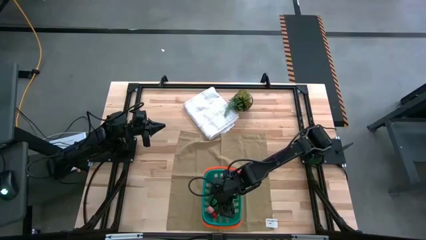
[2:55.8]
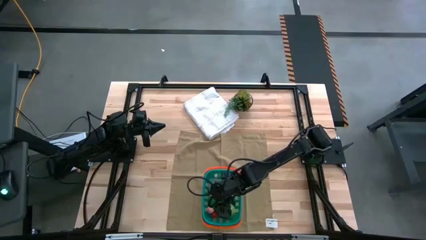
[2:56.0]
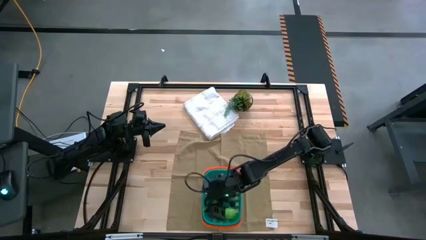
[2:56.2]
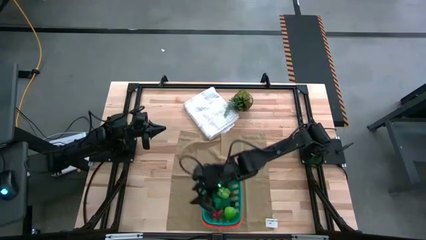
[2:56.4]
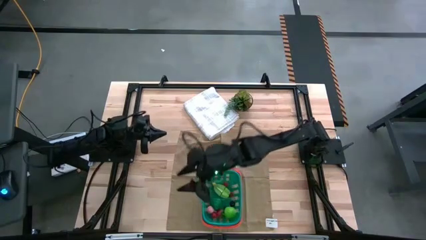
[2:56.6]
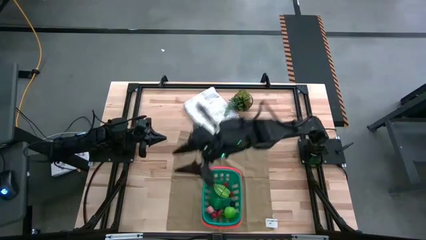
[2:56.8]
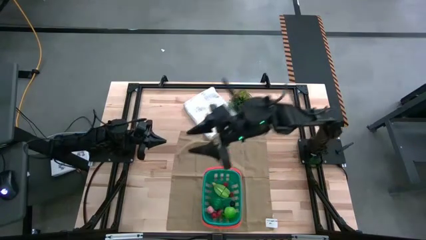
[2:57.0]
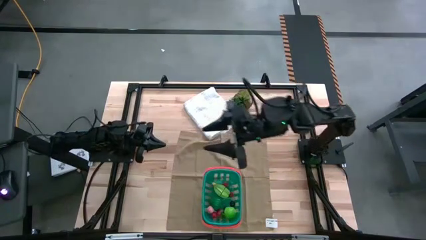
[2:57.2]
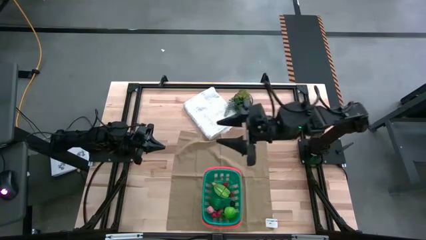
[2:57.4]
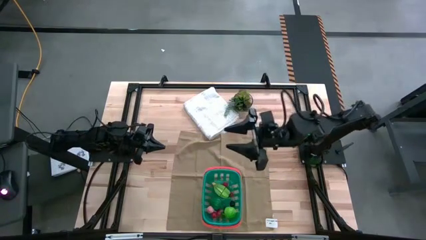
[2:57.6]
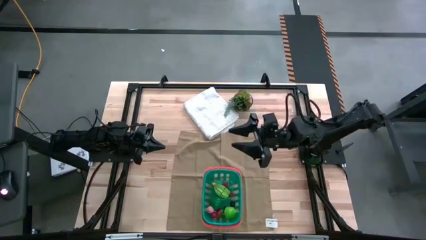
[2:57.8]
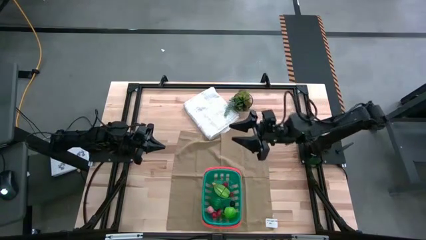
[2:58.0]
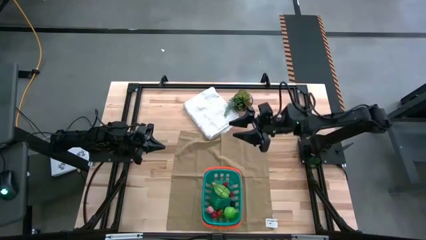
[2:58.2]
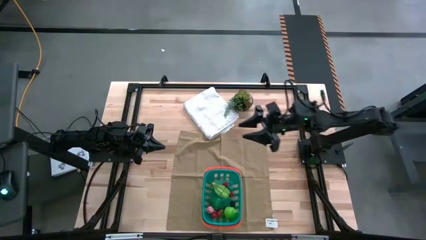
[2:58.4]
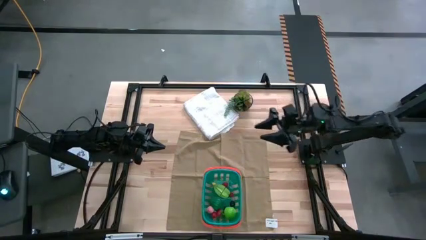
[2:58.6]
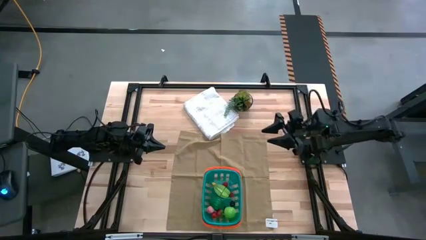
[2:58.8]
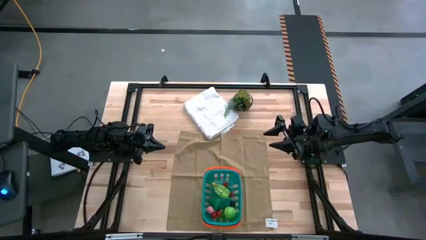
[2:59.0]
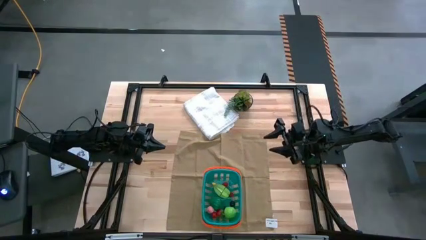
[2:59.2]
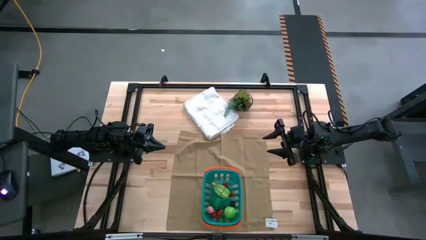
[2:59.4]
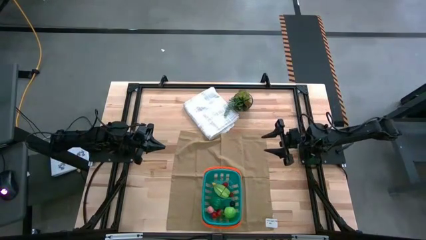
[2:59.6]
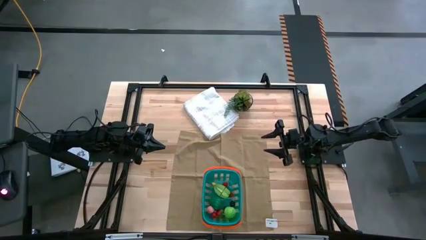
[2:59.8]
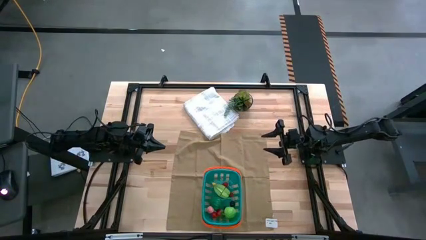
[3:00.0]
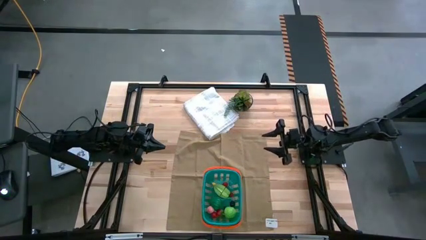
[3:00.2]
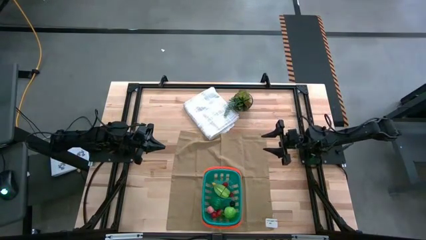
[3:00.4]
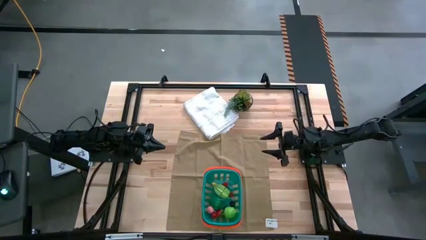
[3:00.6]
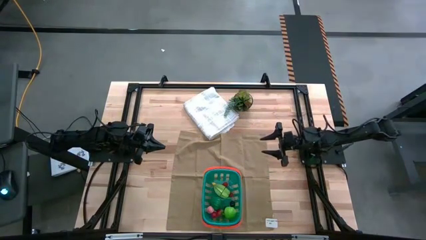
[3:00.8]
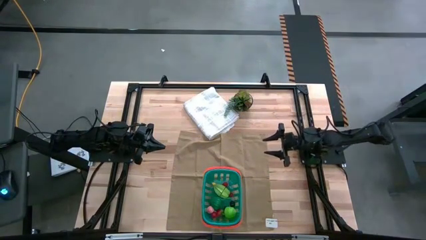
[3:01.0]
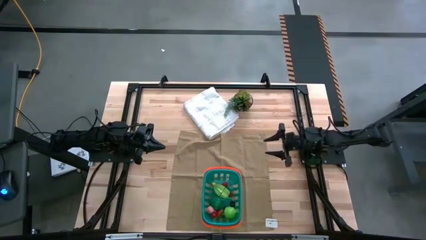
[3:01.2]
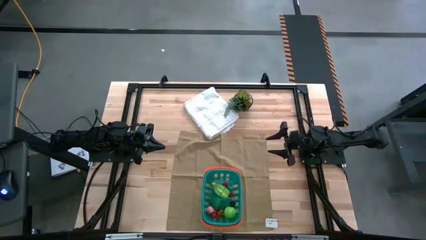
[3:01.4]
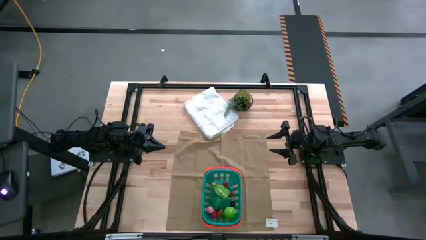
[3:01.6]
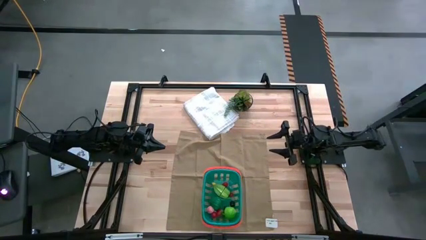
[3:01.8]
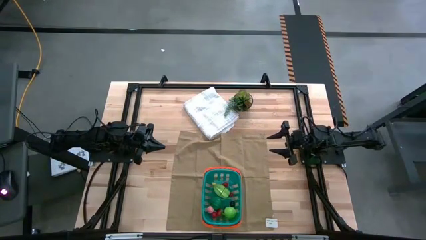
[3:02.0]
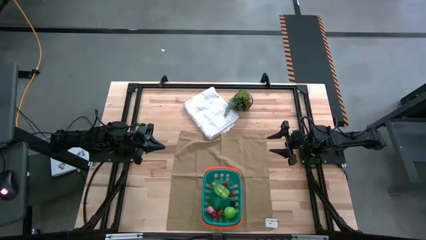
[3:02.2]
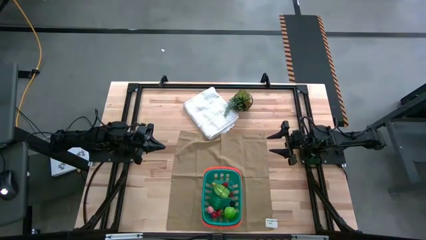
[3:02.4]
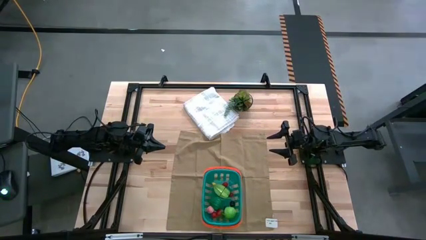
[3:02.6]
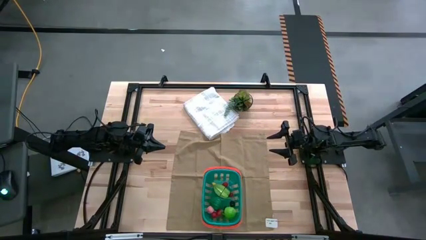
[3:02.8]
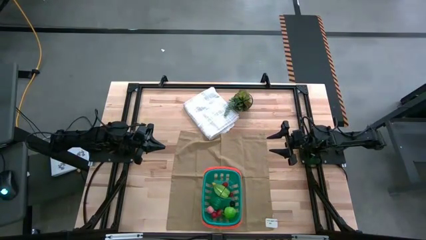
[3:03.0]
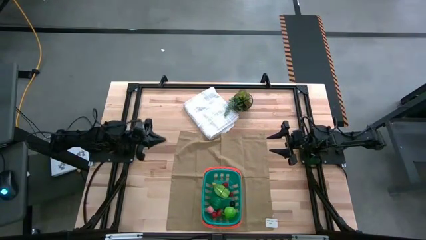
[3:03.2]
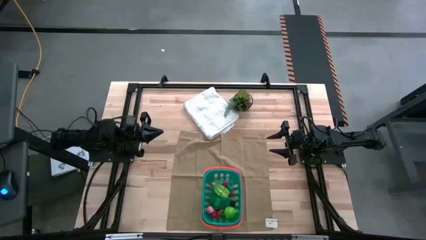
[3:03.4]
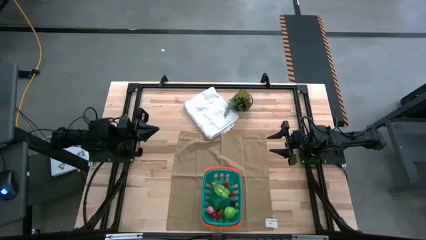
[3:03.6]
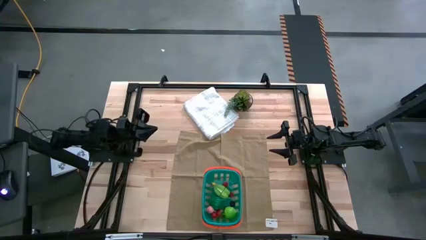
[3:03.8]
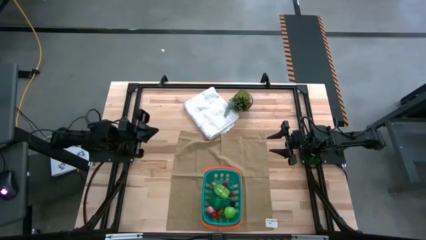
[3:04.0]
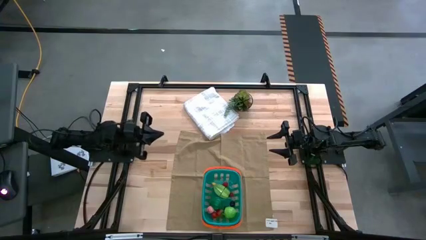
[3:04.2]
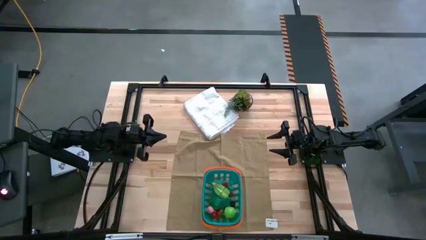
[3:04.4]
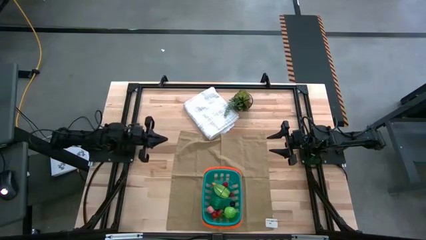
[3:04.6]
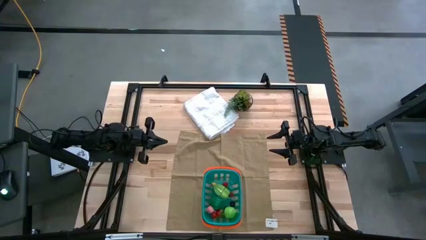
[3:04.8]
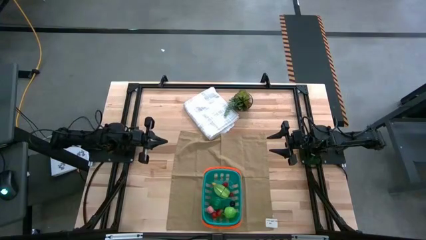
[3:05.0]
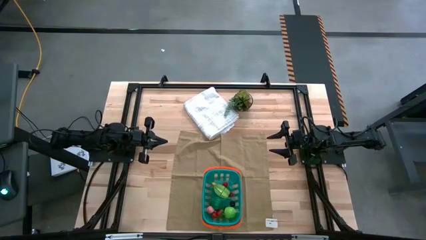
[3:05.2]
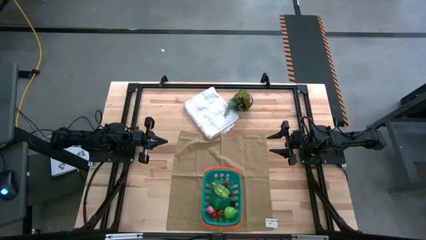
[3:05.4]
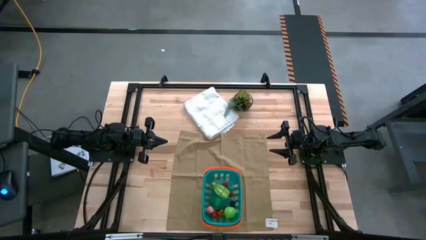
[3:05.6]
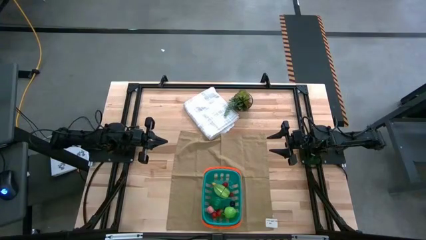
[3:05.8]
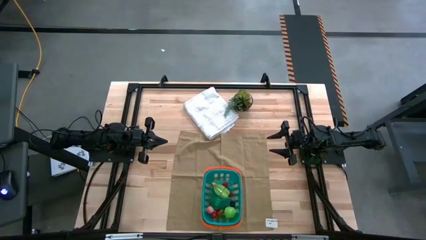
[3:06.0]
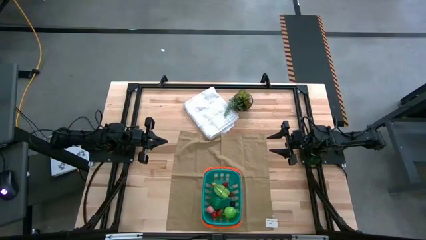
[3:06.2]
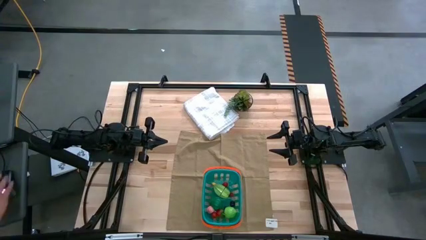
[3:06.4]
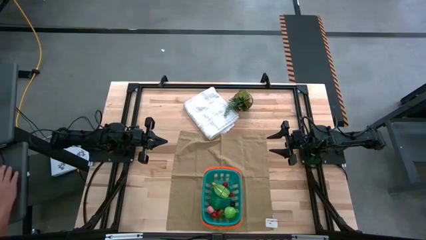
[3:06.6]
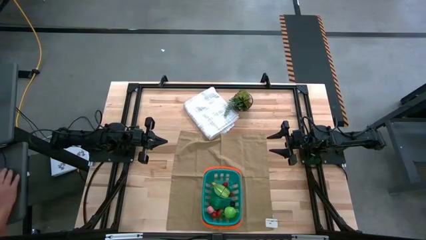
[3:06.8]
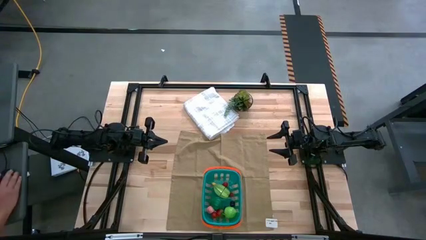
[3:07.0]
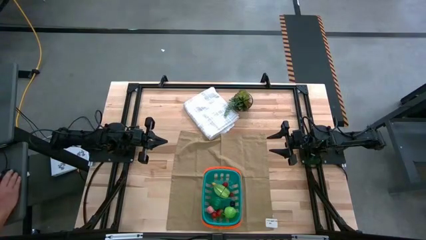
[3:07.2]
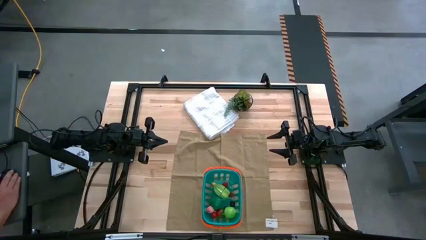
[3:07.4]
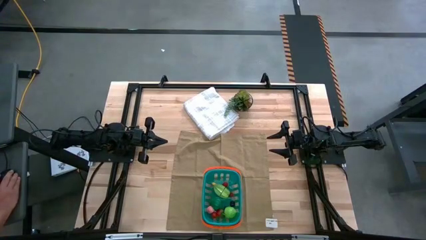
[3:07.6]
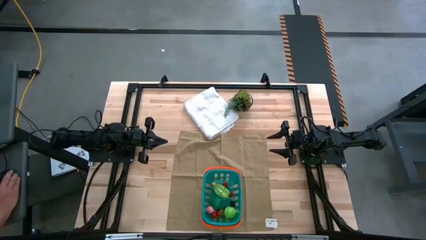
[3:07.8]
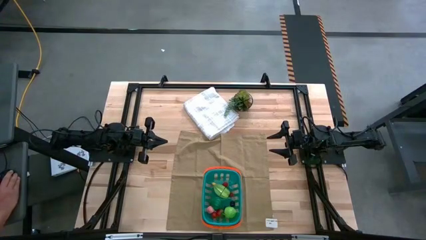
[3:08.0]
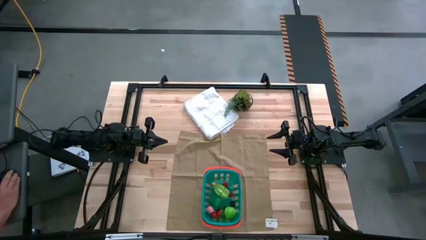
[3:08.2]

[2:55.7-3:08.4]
Task: Pick and placing Produce into tupperware
Return to Home Position

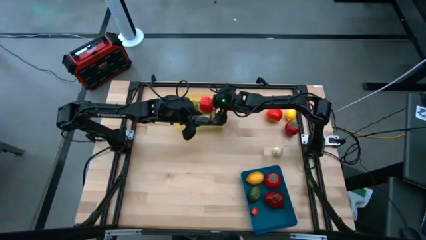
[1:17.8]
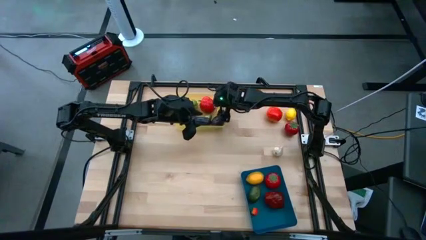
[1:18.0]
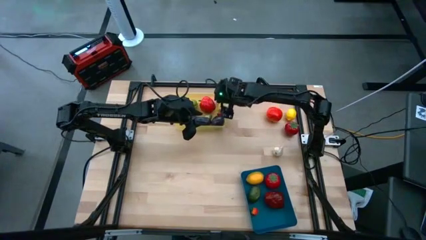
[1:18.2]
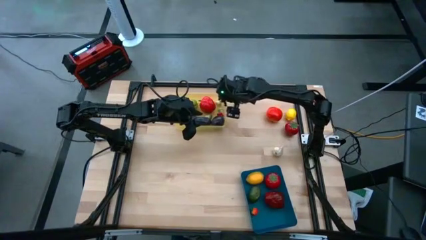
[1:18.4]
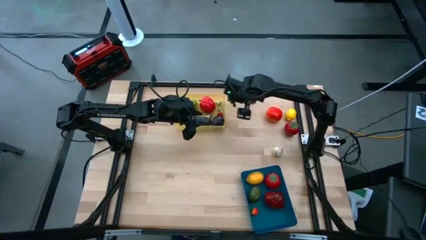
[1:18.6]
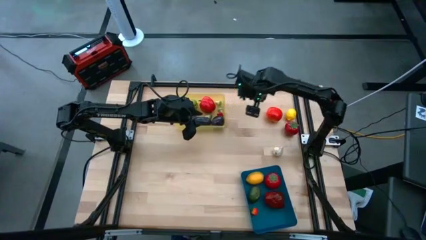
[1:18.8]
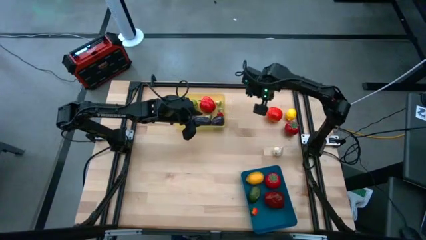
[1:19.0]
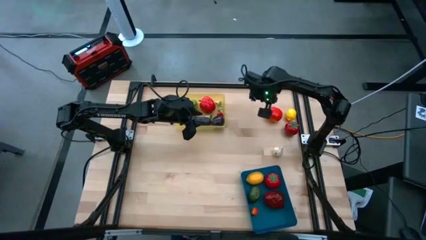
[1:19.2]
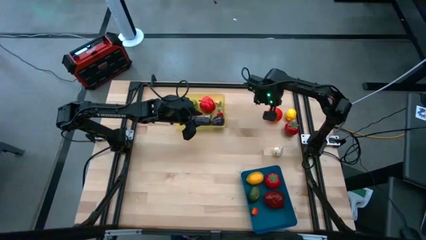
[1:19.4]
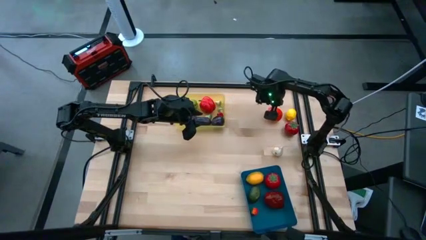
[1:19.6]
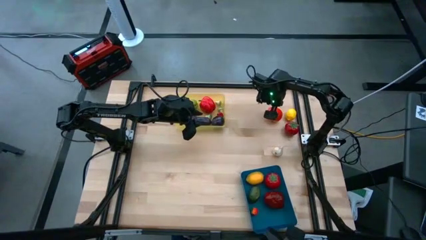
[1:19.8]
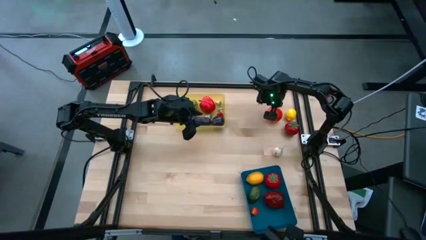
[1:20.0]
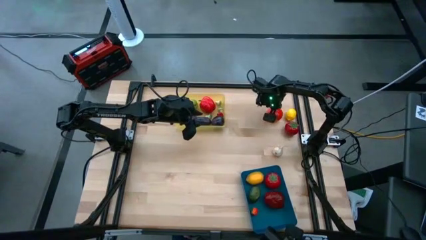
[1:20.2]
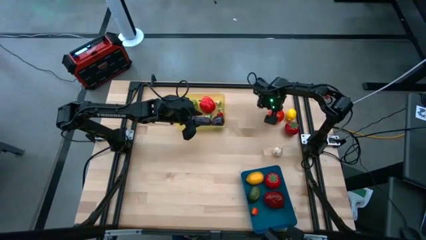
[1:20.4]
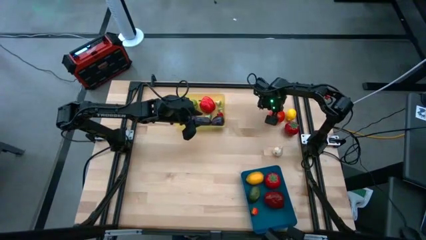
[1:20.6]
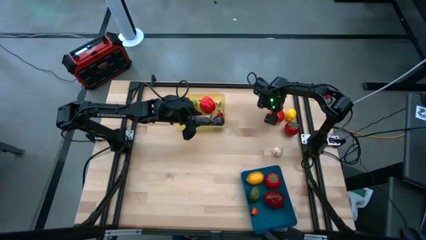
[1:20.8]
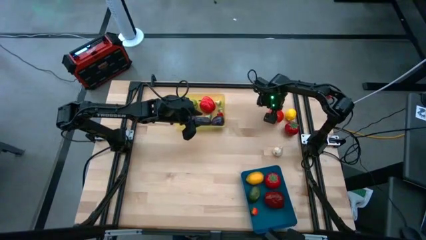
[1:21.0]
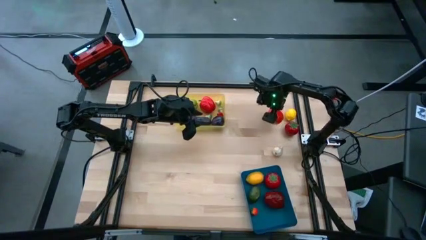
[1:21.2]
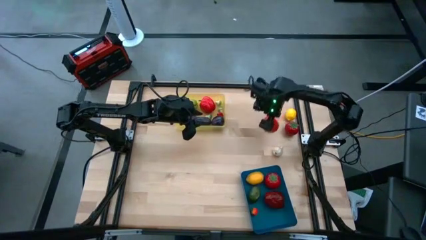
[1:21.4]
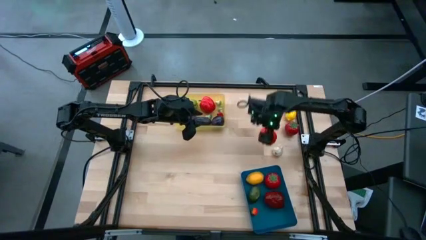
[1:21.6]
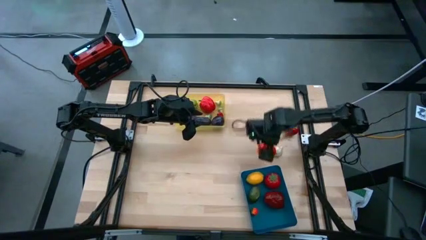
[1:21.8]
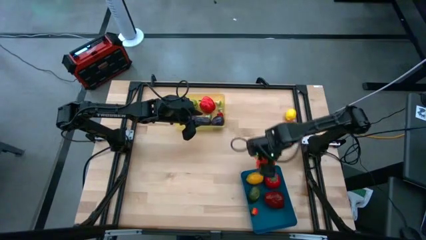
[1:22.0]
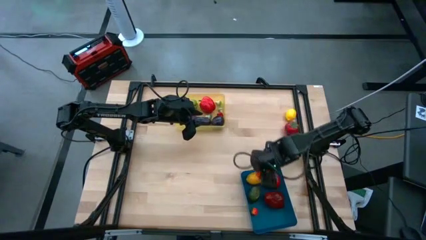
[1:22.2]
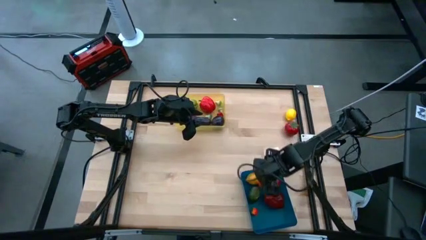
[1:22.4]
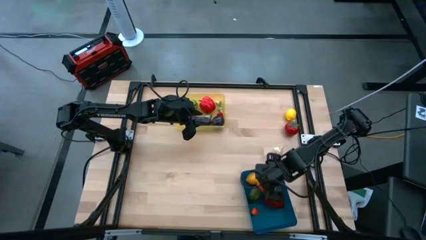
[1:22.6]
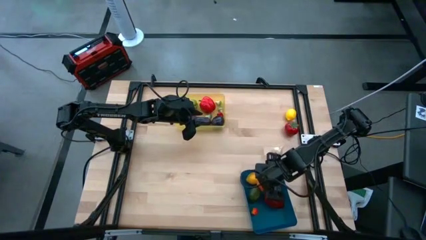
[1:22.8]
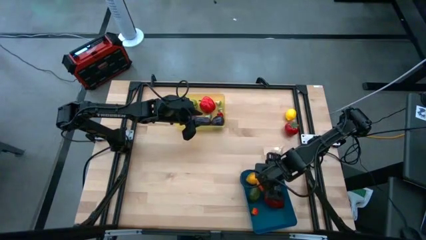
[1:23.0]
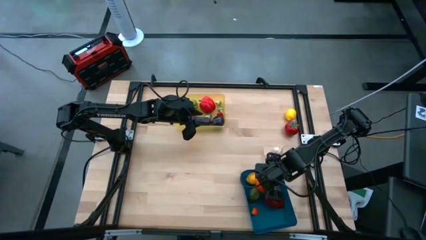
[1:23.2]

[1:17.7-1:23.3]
Task: Sort produce into baskets
Put the orange tomato into the blue bin
